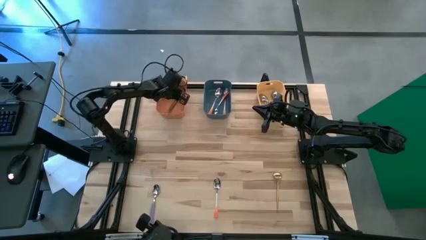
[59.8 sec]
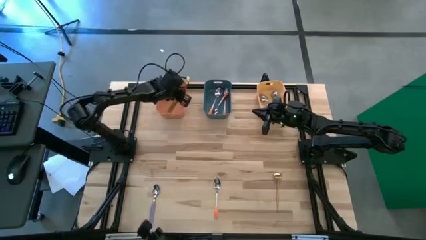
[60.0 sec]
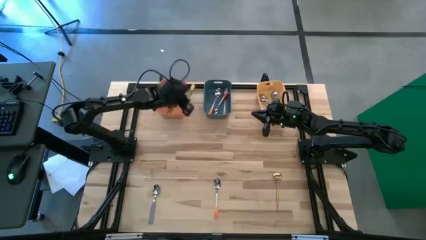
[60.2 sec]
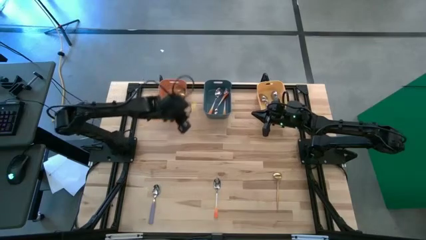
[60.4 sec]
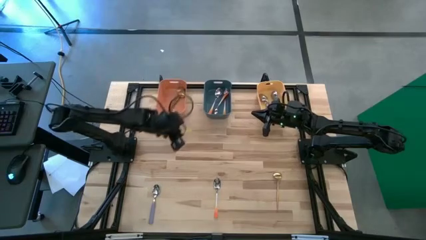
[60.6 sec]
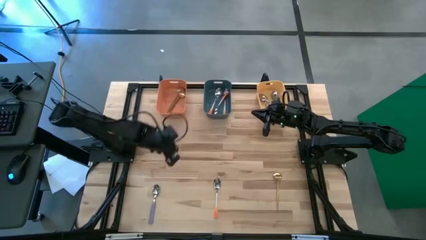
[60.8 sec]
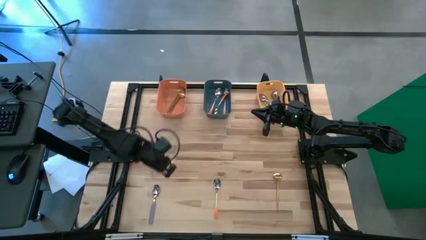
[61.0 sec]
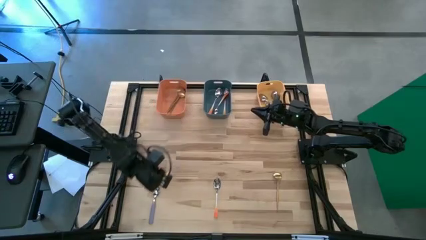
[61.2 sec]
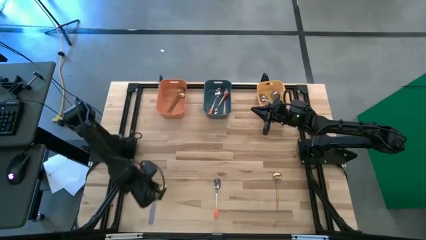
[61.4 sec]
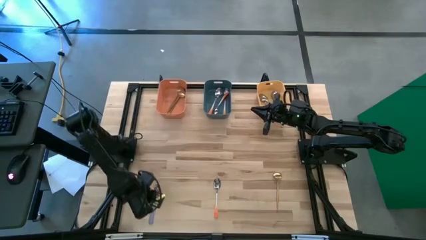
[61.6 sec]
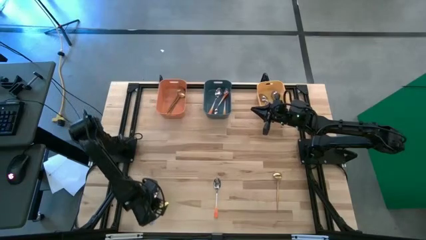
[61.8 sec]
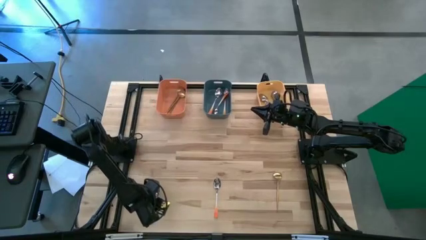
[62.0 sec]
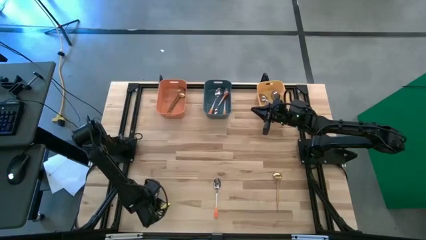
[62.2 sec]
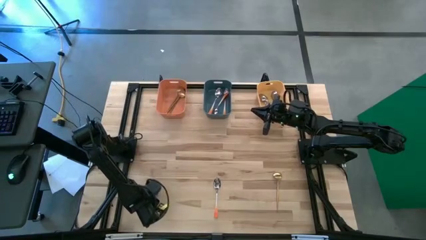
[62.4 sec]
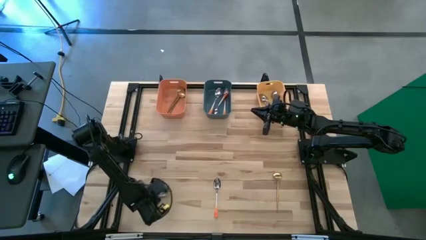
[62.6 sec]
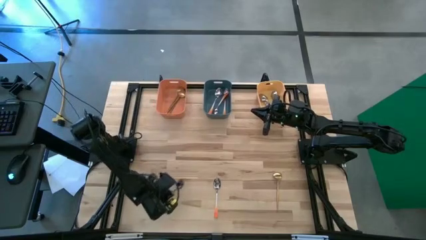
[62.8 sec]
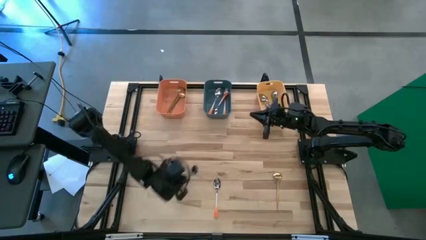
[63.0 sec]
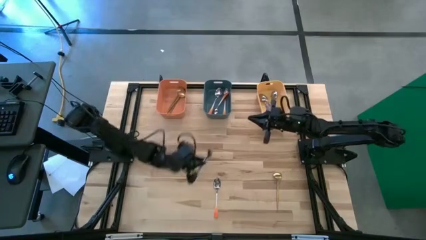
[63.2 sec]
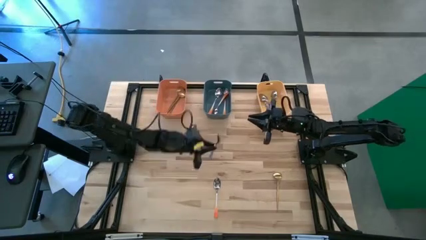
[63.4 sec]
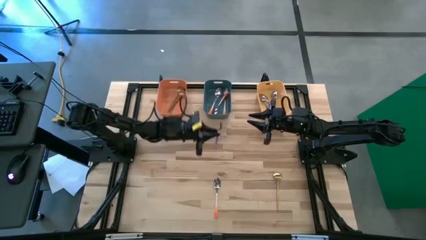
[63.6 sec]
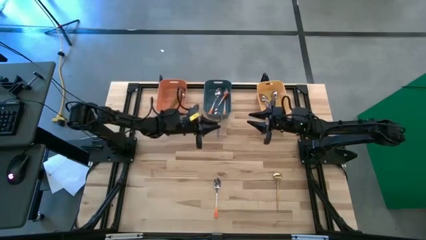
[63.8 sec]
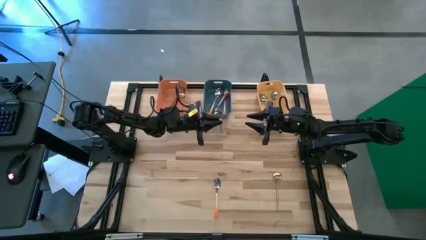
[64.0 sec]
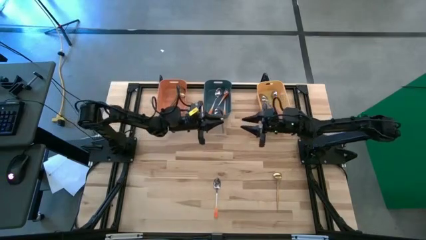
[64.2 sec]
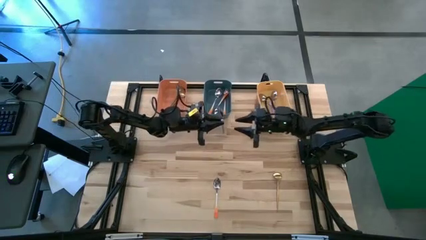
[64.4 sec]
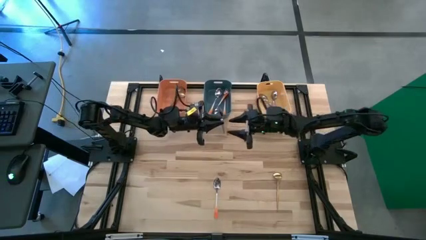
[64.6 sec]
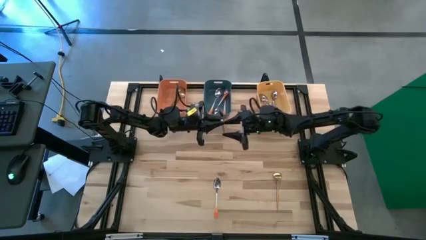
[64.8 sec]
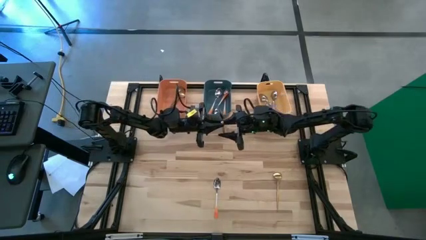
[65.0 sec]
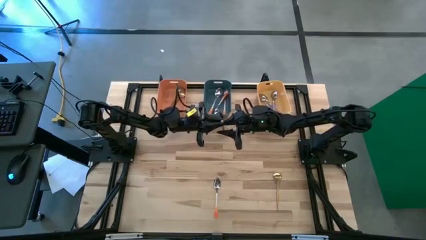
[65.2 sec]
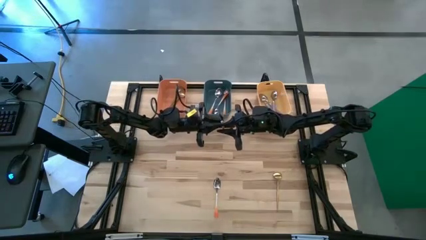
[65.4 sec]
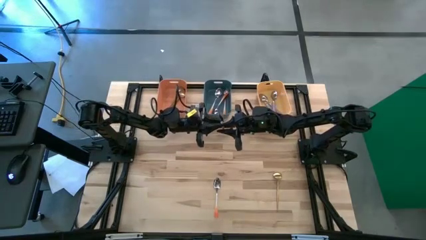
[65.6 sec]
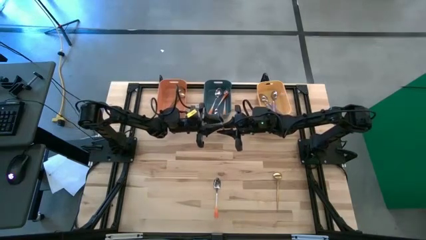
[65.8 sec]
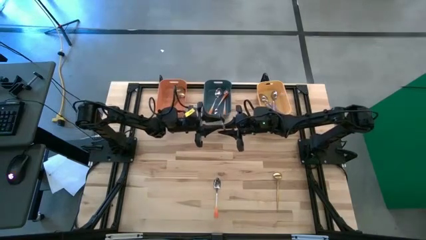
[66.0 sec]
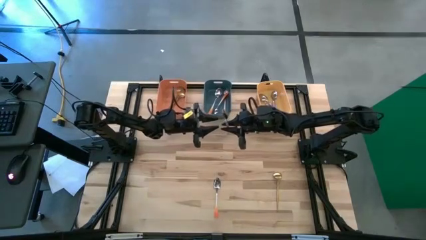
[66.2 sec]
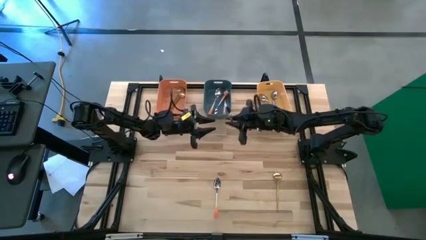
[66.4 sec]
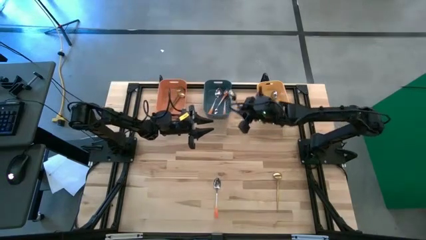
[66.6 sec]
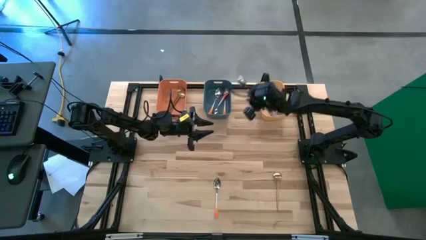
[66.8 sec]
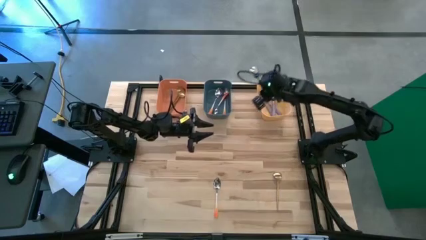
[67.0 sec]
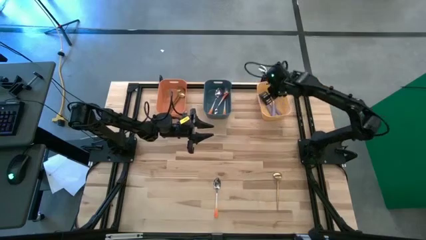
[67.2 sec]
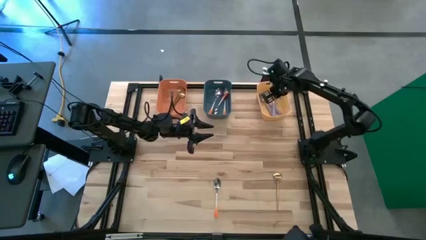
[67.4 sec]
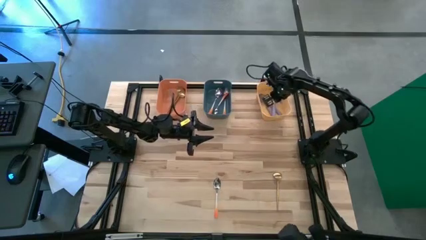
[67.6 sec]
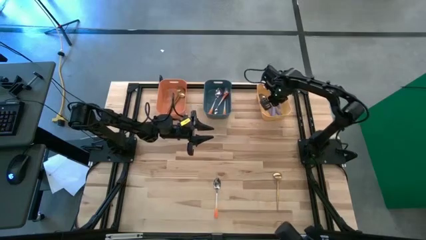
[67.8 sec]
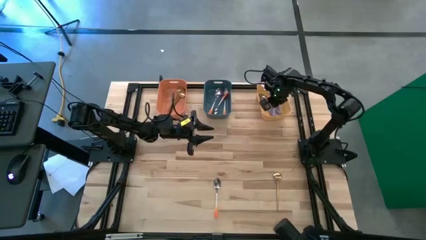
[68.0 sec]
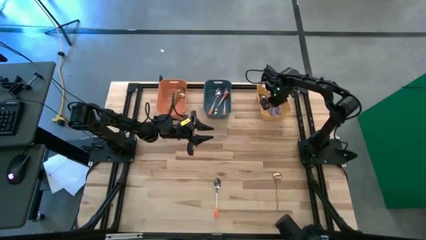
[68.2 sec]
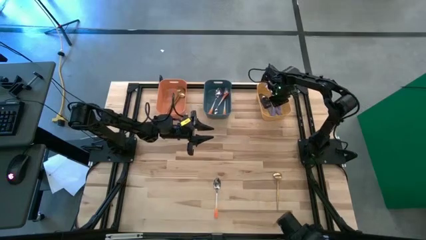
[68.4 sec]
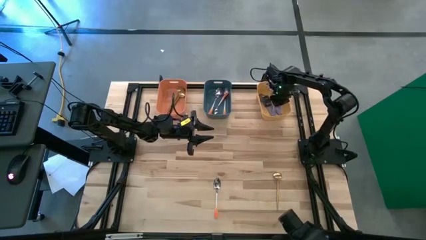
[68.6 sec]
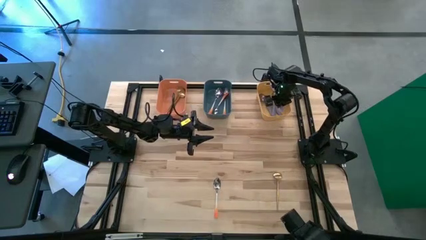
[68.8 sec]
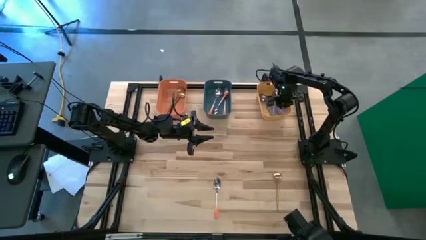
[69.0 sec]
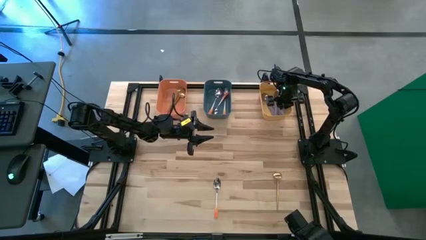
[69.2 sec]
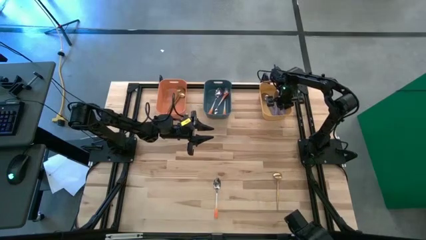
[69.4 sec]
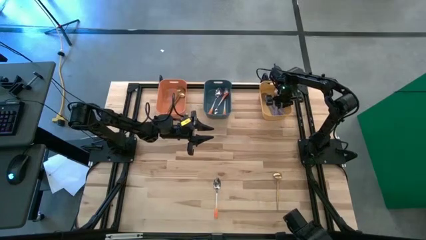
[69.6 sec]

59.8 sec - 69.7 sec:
Task: Sort silverware by color (type)
Put the purple spoon into the yellow bin

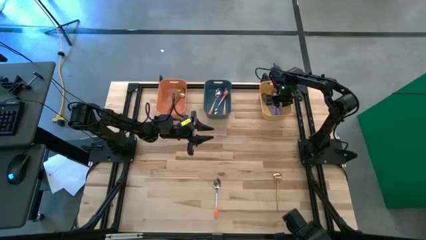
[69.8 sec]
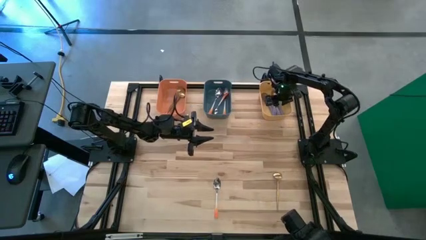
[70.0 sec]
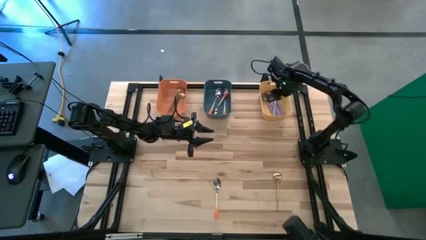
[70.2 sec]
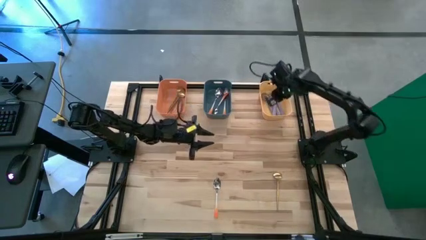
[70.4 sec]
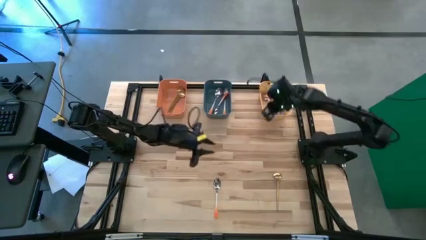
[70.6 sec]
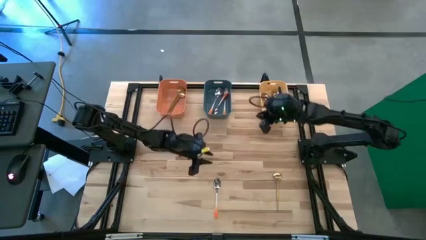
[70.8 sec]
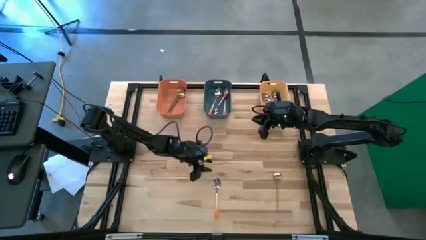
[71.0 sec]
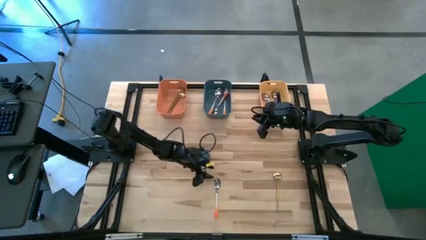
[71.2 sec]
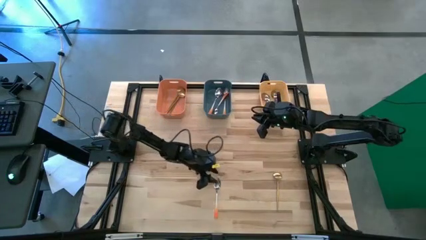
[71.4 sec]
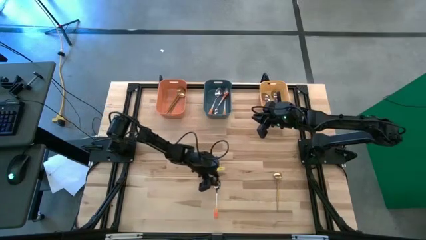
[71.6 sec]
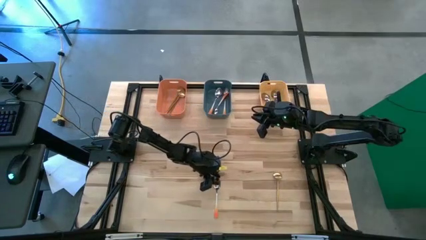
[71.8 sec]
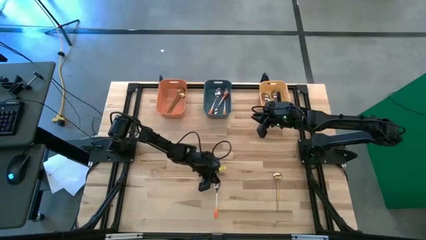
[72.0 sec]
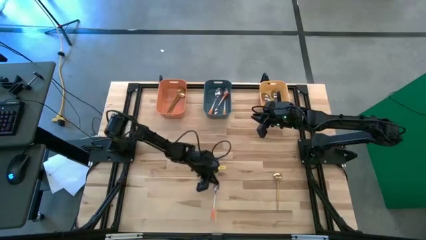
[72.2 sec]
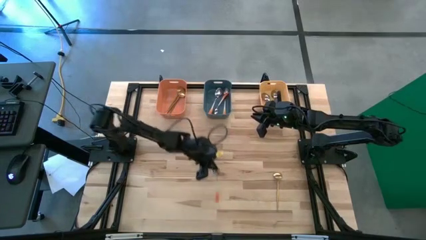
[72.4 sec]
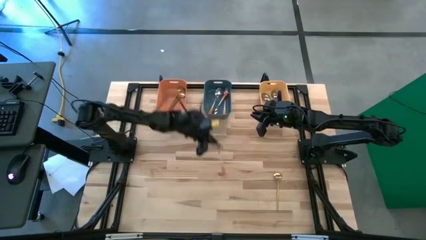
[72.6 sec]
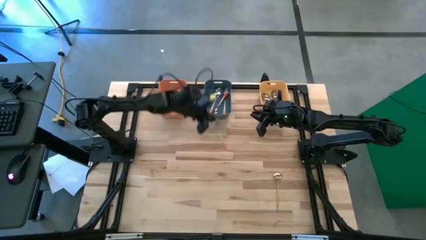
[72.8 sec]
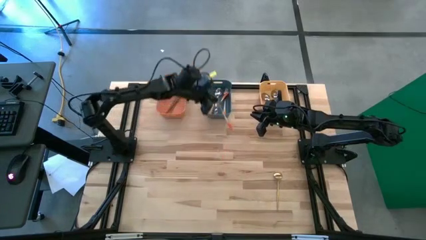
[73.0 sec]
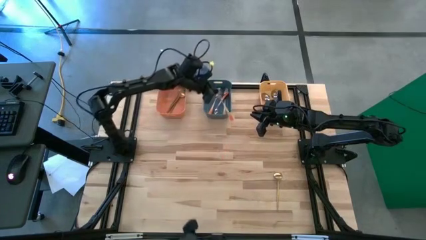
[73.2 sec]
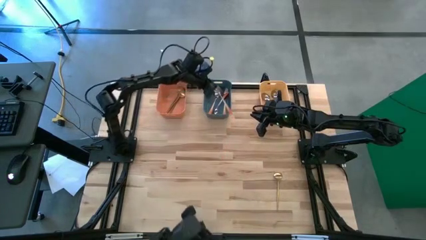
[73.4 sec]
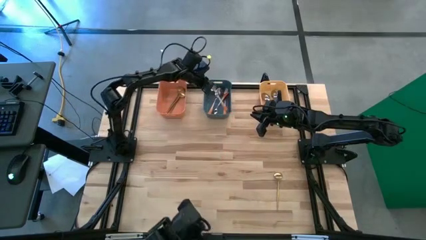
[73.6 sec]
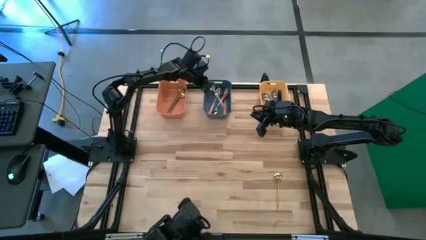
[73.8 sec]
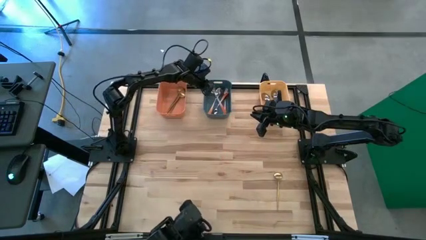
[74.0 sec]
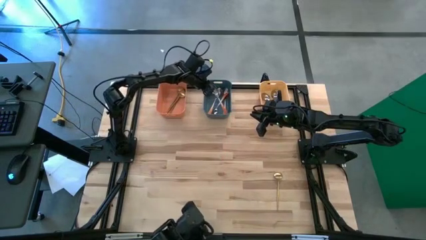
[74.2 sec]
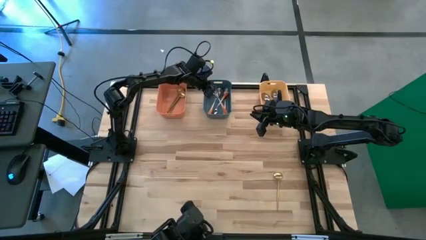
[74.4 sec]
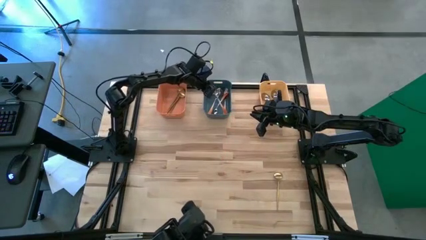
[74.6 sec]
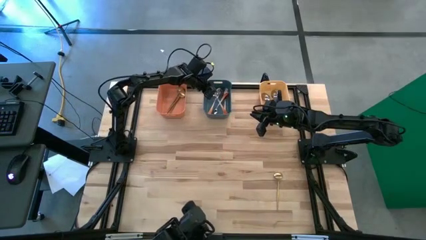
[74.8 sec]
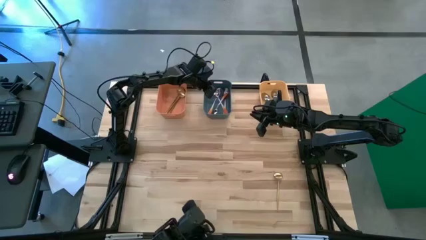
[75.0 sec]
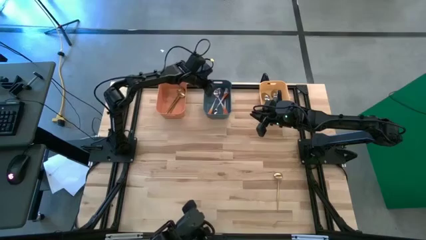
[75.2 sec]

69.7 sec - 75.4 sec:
Put the orange spoon into the blue bin
